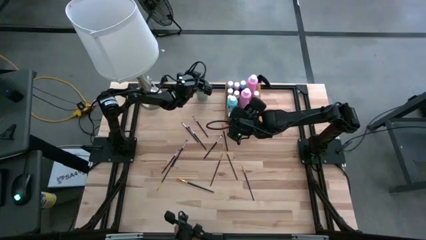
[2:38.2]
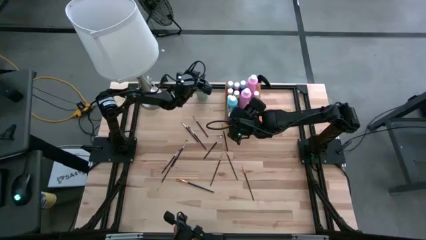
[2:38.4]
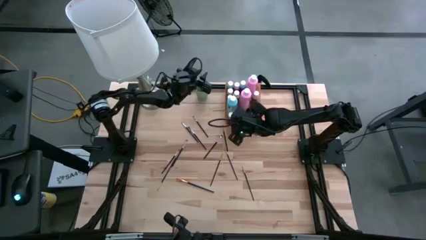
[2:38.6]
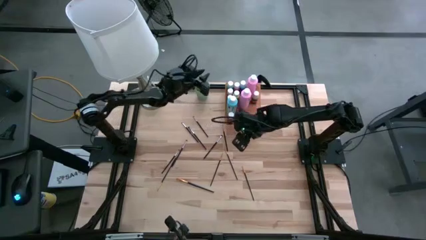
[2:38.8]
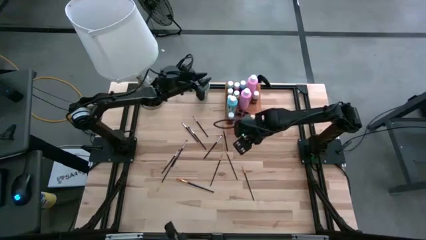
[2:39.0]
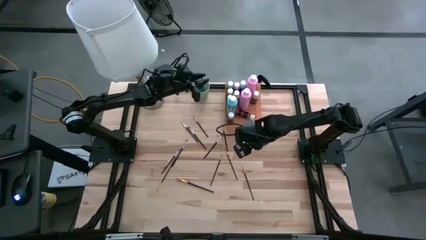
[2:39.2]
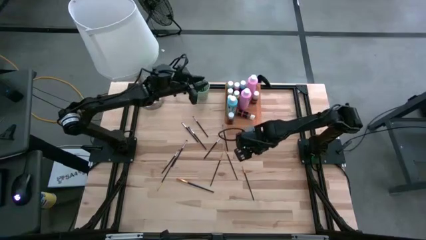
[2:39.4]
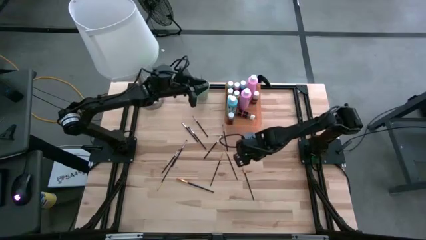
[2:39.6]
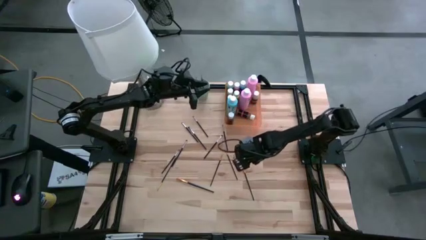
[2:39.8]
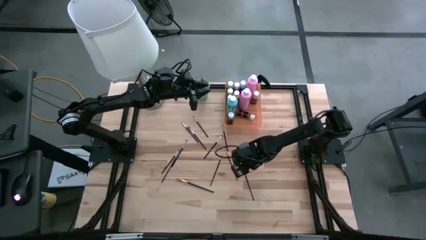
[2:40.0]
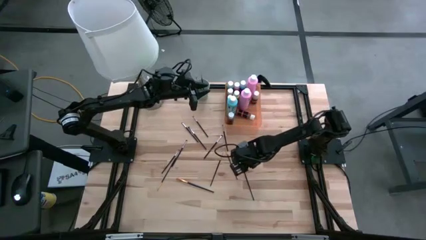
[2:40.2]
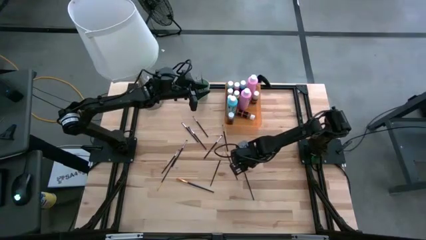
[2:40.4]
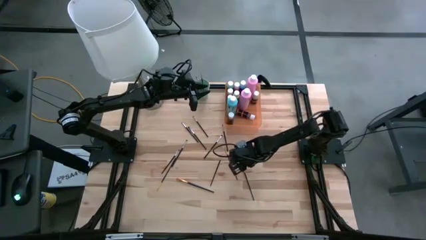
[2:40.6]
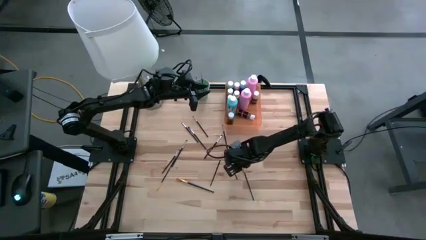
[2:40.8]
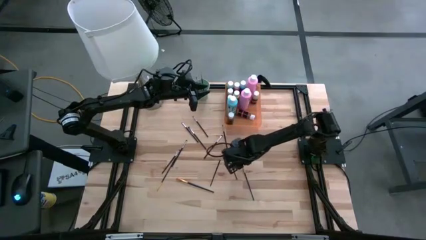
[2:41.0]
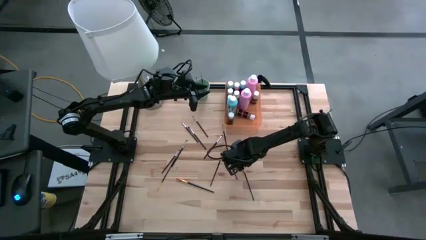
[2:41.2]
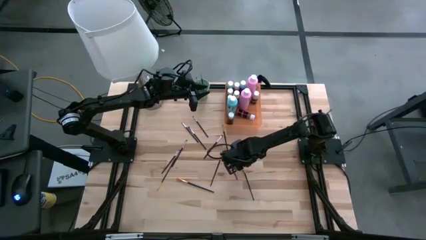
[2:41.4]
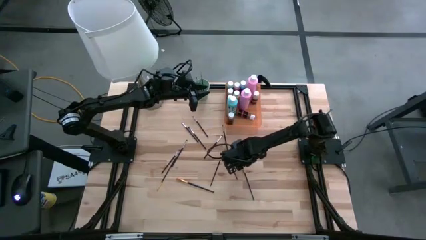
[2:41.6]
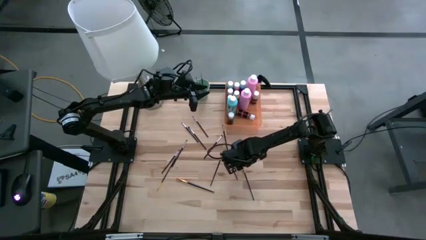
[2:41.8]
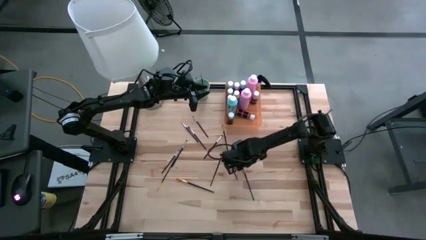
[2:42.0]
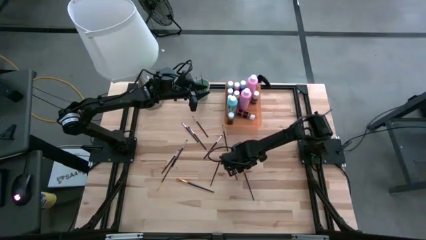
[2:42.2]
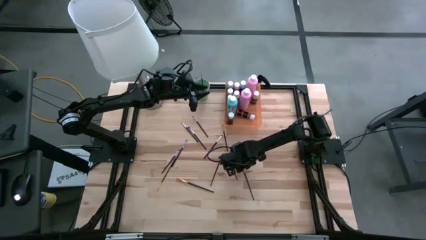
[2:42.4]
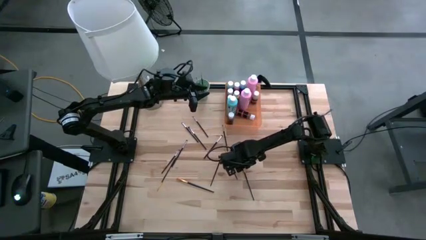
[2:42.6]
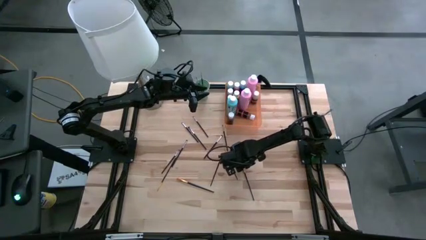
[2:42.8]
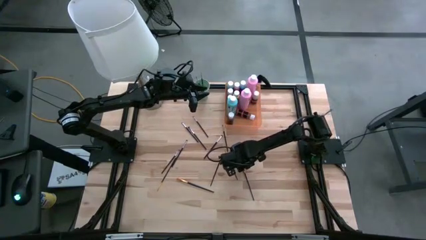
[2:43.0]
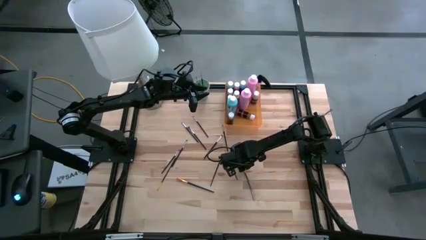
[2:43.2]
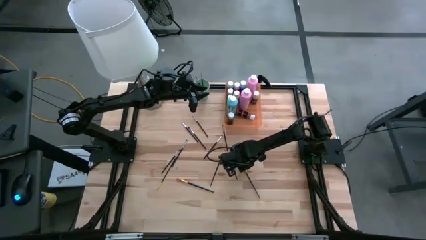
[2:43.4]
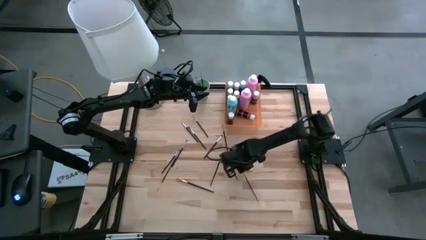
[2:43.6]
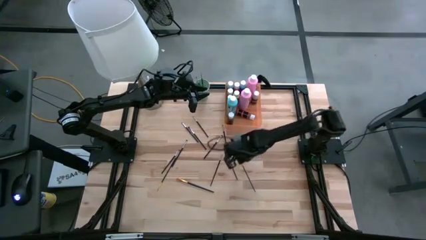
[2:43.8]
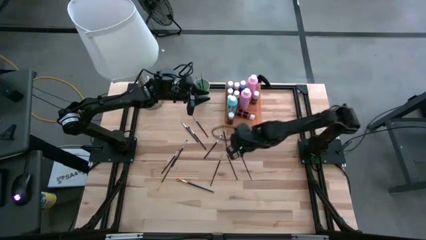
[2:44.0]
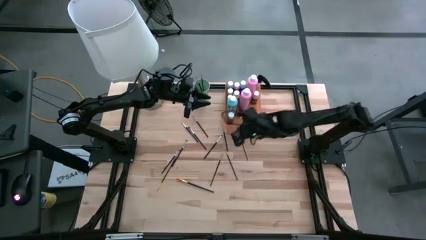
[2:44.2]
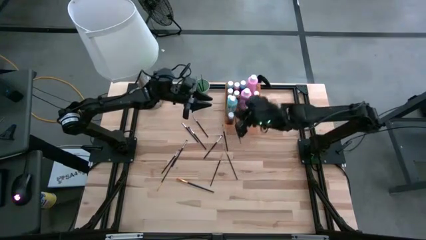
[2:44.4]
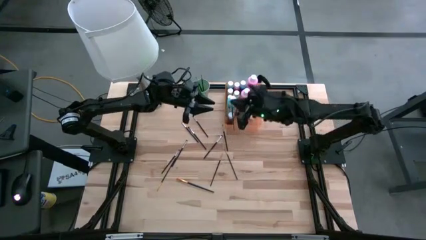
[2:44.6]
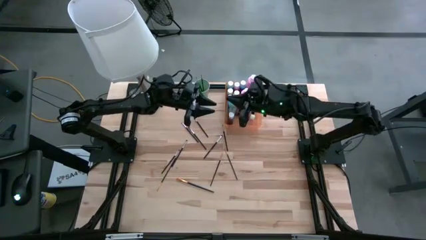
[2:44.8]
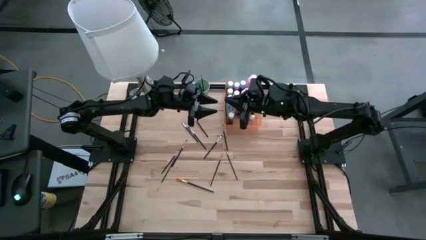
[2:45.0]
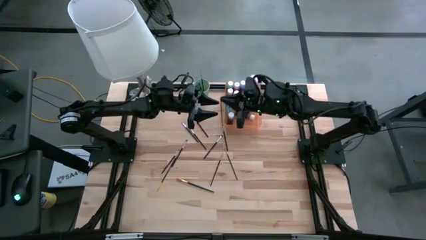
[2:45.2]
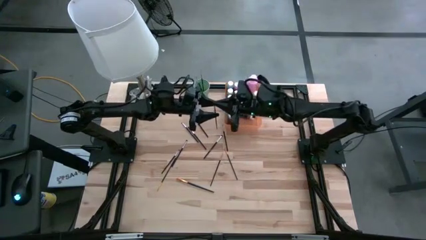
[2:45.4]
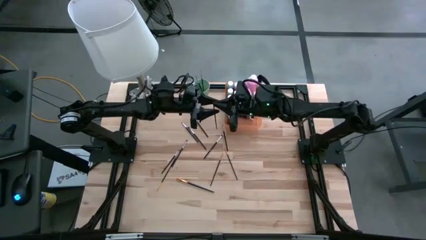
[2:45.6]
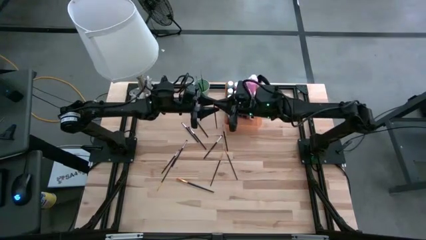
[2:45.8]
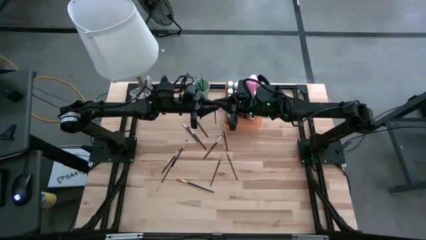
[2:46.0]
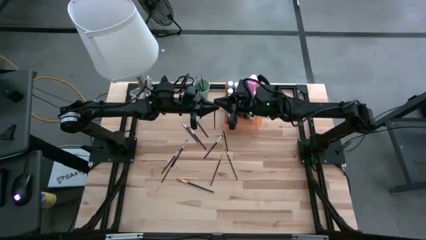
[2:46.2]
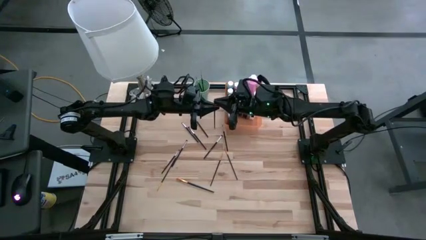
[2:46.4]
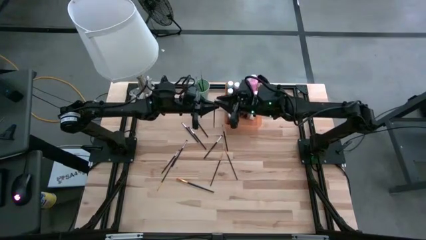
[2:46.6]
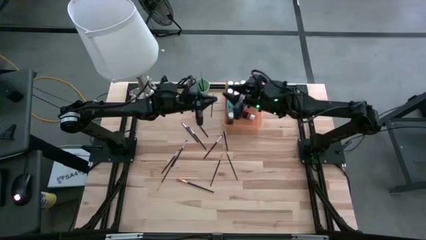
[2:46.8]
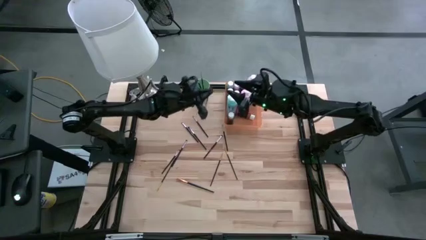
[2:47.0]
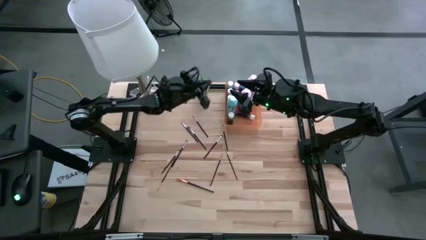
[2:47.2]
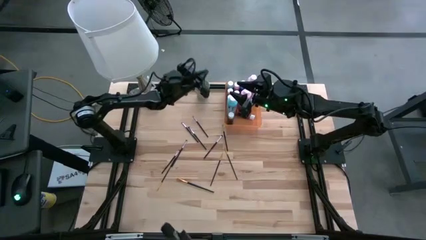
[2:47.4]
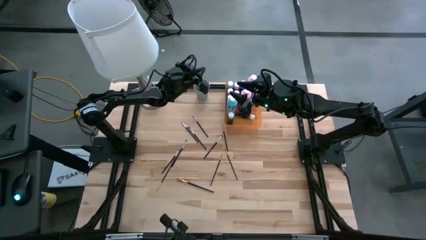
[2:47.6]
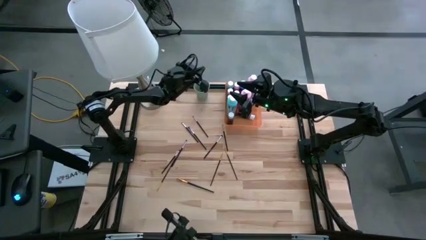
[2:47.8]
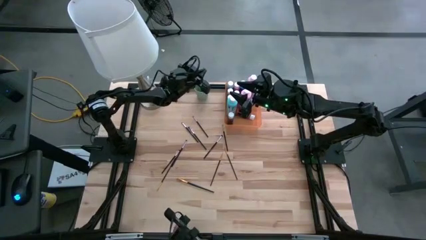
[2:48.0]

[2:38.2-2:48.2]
Task: Pick & Place Paint Supplies
Put the yellow paint brush into the green cup
